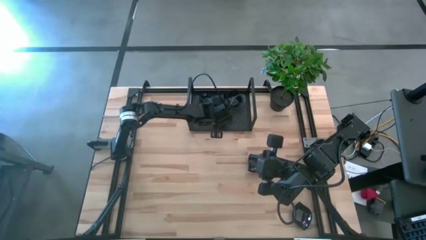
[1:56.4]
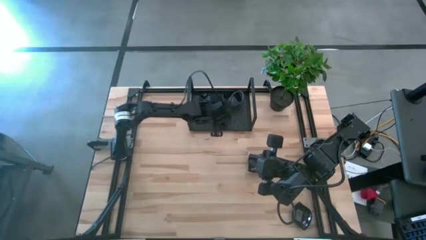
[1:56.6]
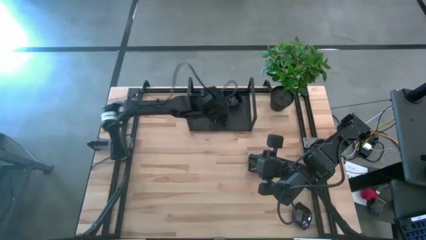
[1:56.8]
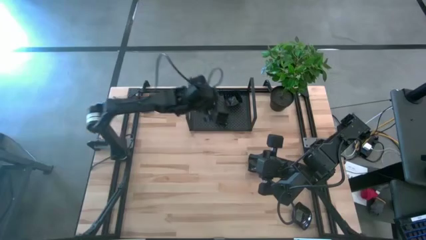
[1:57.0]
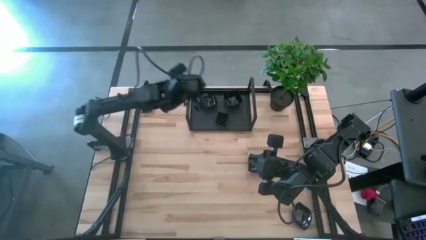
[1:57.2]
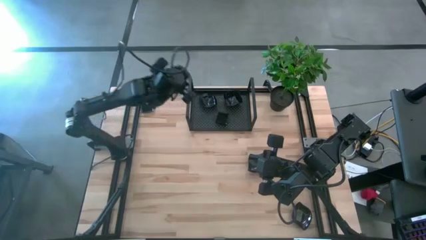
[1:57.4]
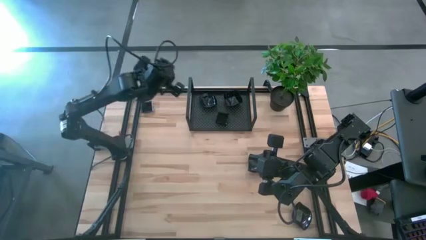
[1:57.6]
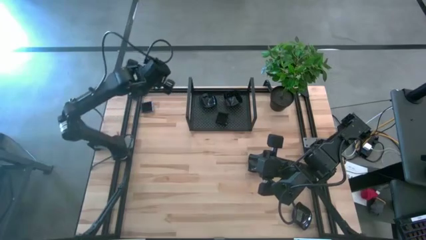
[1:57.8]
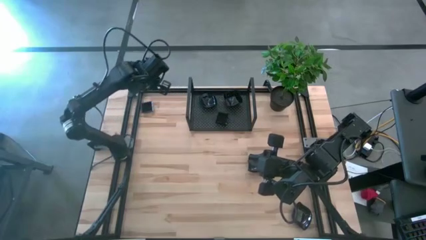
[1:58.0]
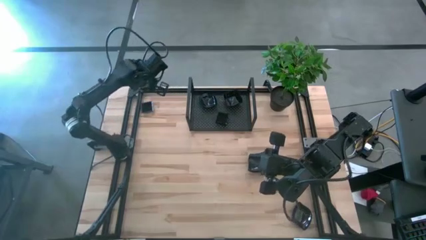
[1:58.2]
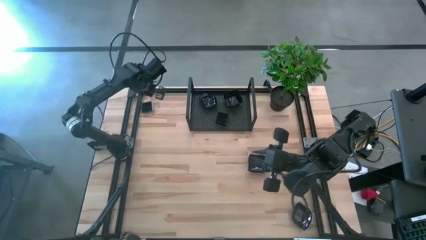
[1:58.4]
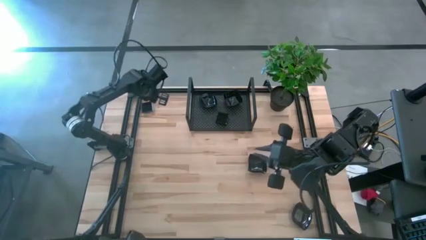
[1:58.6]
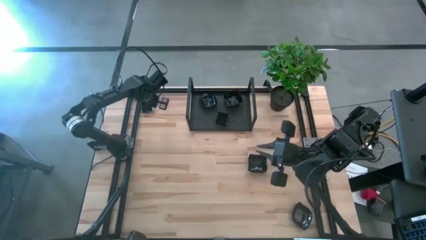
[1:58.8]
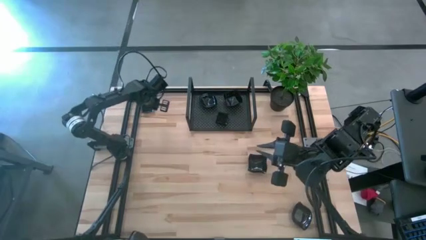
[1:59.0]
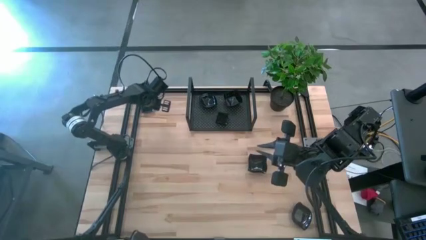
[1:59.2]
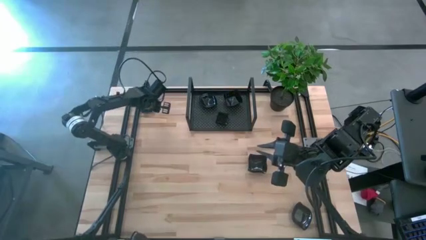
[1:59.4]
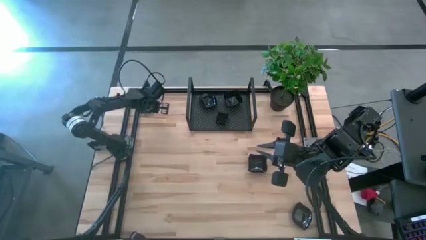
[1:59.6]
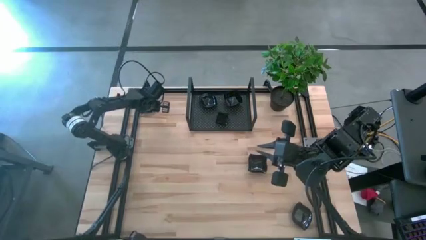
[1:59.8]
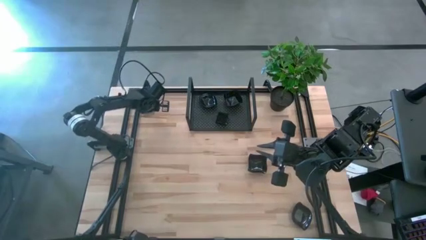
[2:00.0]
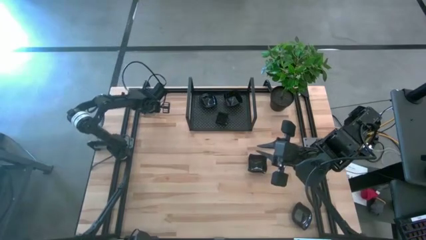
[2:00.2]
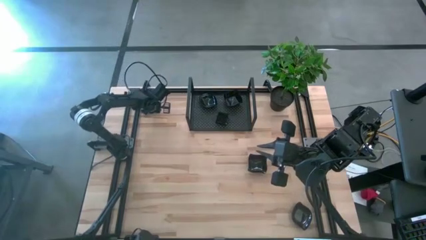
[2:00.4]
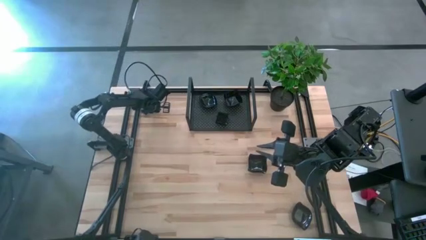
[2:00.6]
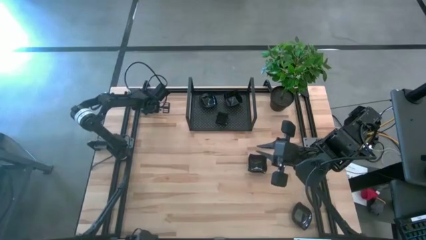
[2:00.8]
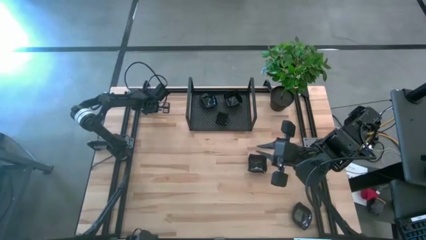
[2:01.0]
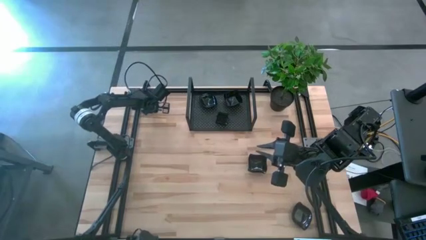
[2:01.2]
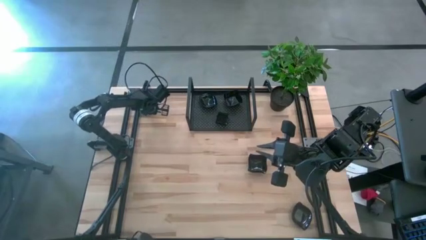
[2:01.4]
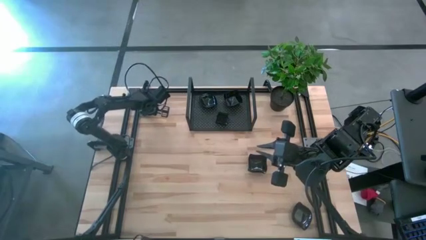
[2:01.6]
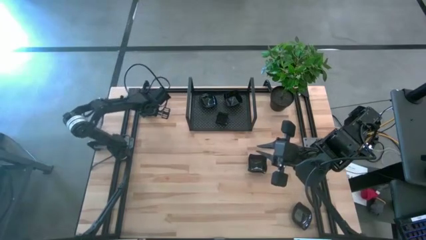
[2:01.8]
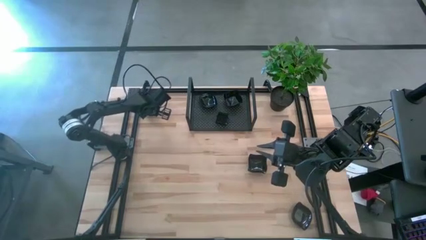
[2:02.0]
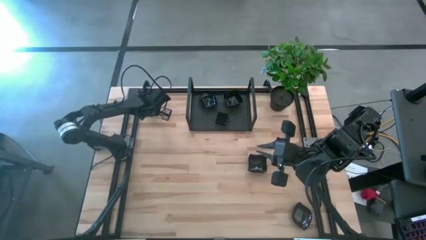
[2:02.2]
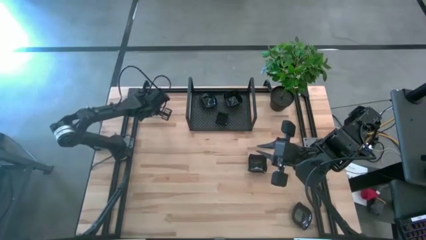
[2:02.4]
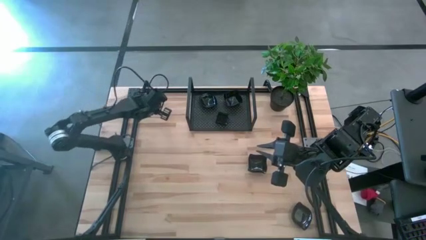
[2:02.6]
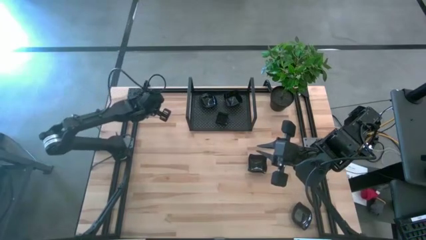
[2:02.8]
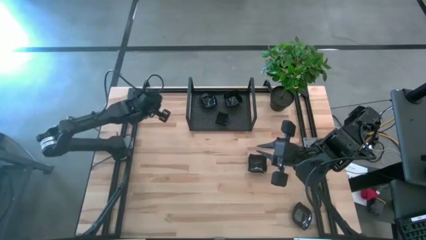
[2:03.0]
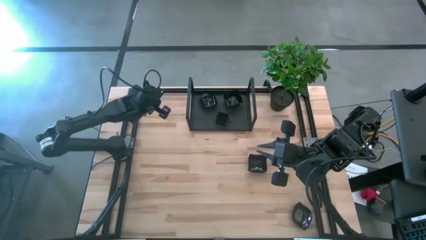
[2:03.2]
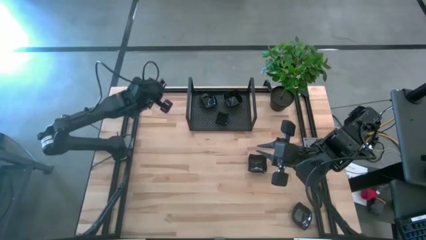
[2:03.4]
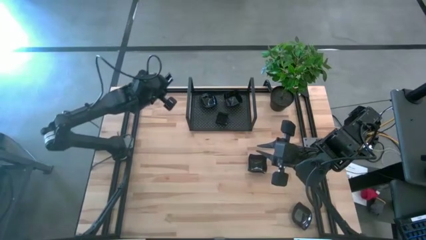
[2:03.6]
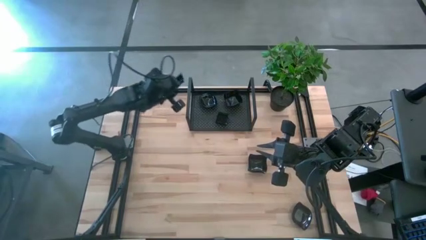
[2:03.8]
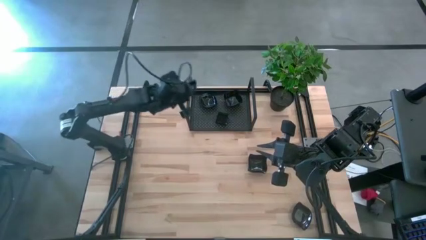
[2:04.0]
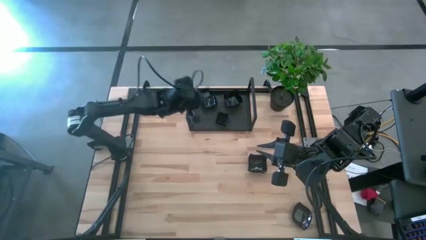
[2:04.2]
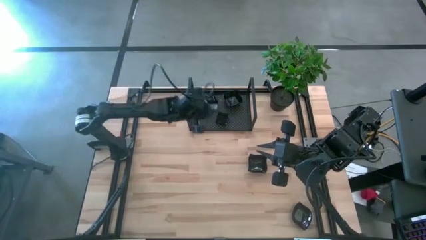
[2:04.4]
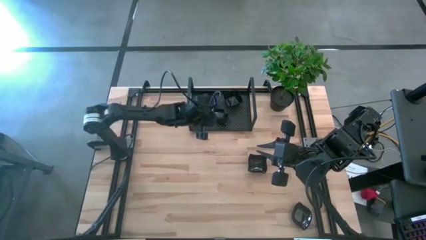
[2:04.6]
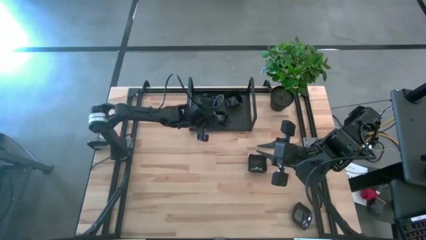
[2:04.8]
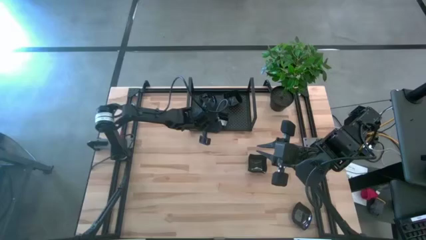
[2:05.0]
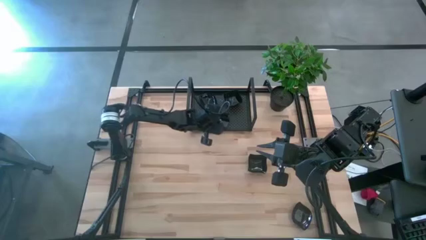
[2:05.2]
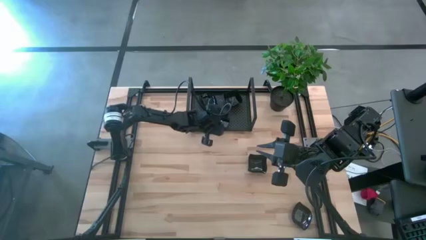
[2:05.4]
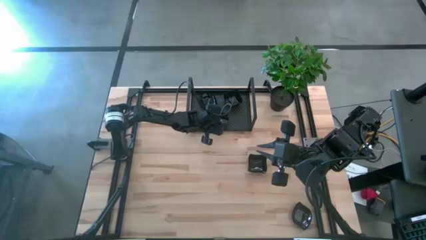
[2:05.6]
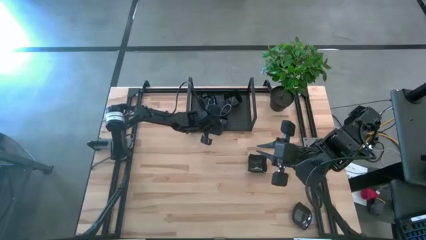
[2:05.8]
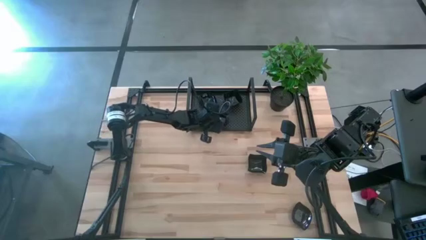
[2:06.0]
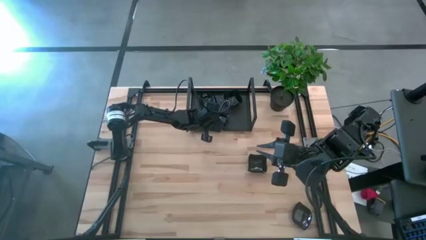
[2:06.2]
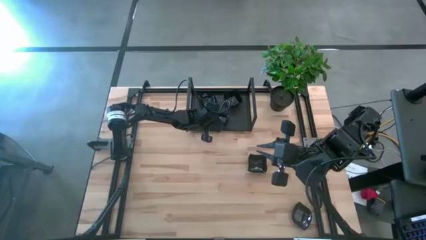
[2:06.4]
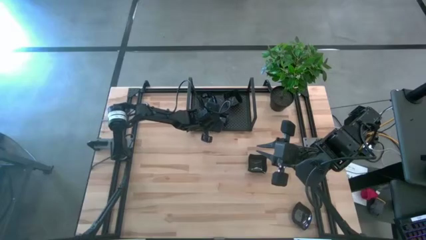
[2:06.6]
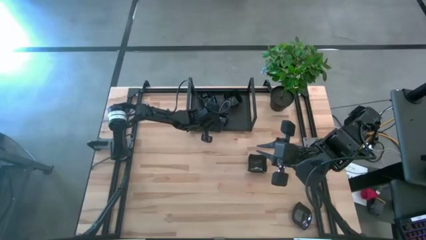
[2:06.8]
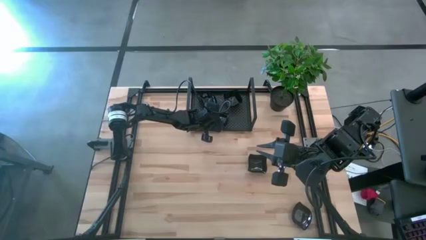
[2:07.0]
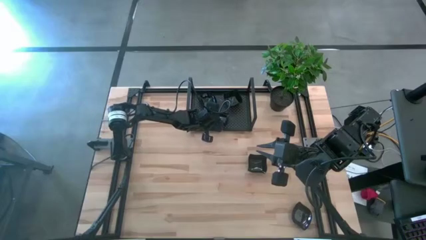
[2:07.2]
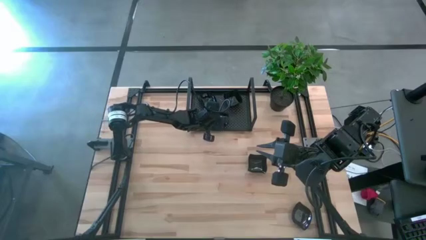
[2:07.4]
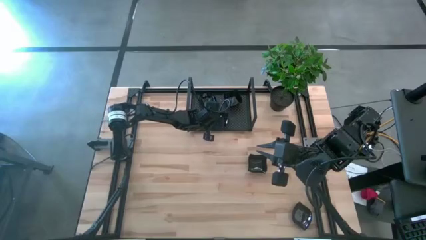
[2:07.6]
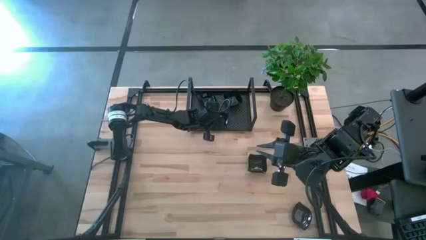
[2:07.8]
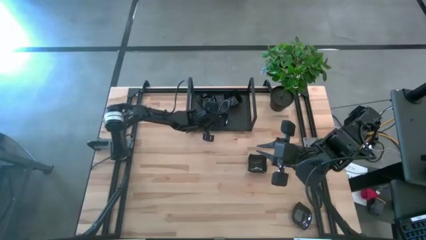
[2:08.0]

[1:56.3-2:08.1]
Task: Pick & Place Mini shaped plates
Stack the black square plate on top of the black square plate on the shelf

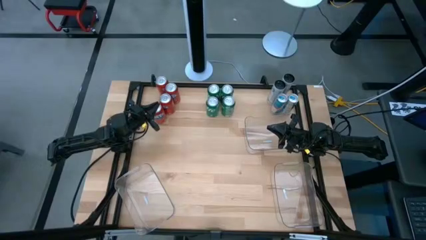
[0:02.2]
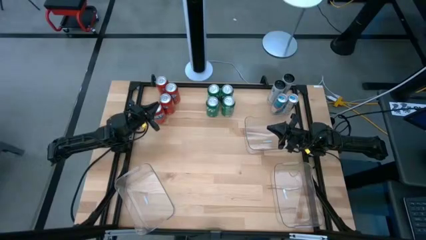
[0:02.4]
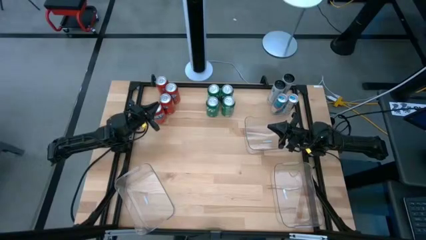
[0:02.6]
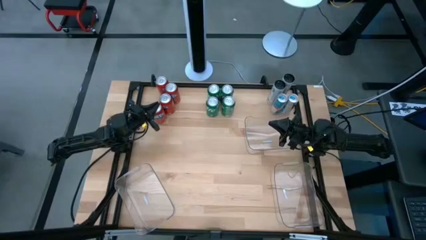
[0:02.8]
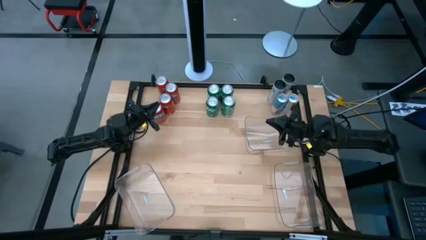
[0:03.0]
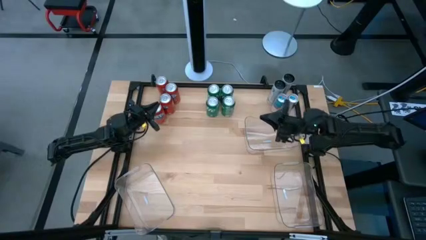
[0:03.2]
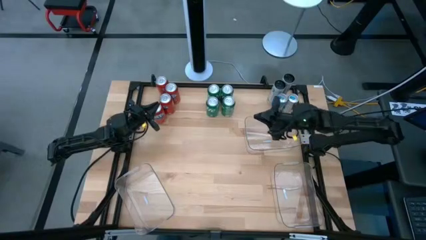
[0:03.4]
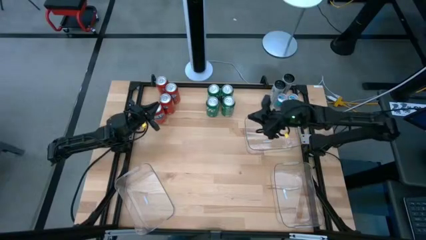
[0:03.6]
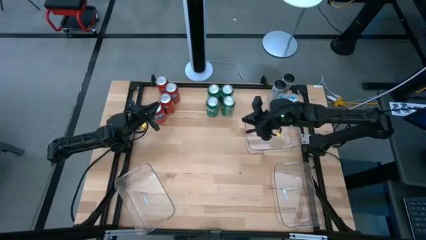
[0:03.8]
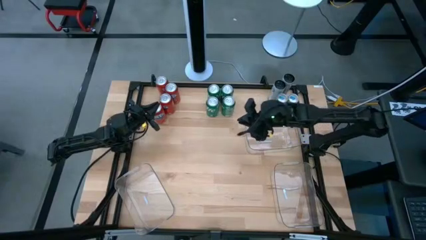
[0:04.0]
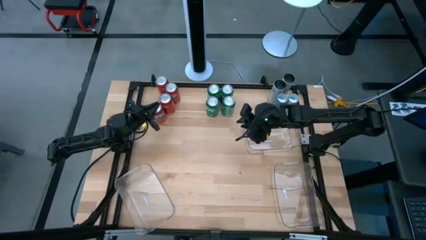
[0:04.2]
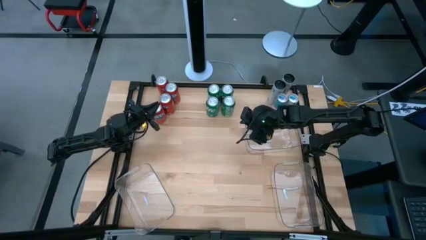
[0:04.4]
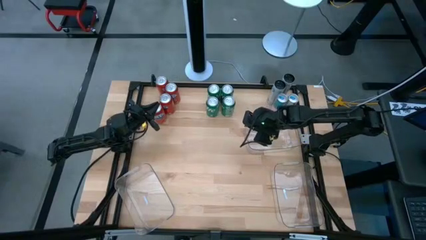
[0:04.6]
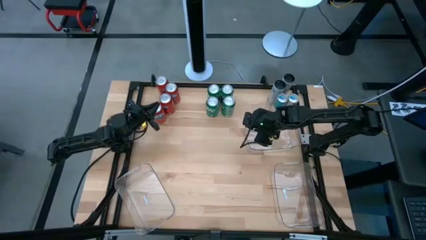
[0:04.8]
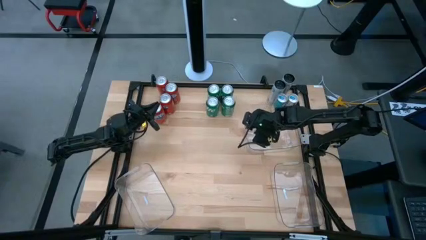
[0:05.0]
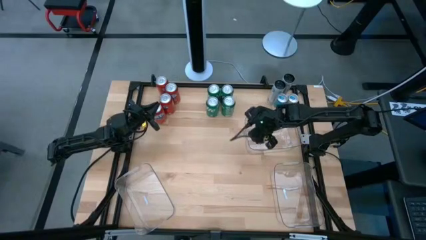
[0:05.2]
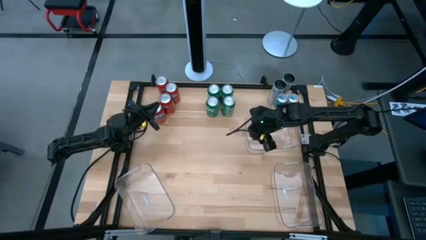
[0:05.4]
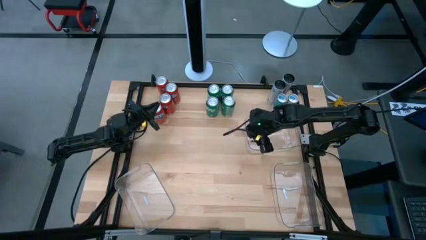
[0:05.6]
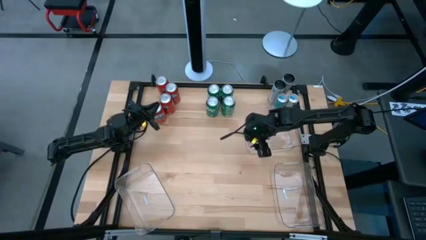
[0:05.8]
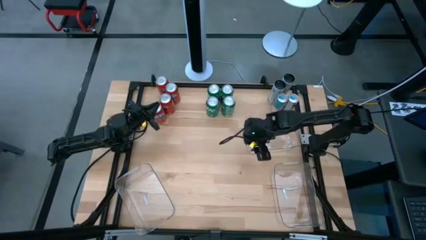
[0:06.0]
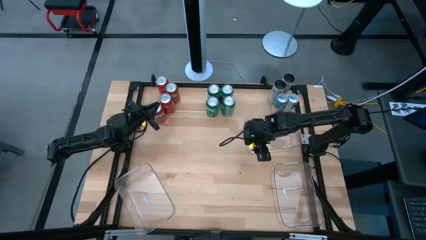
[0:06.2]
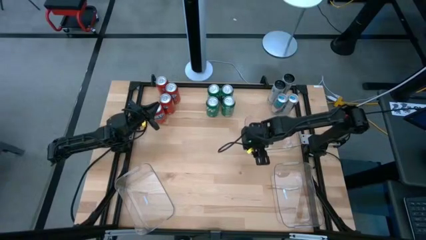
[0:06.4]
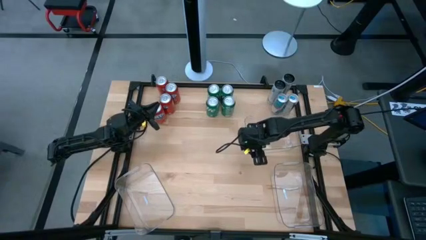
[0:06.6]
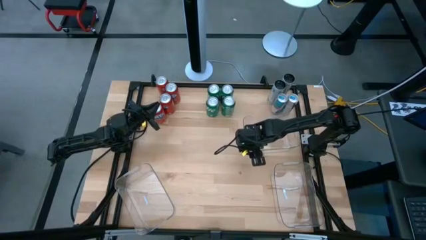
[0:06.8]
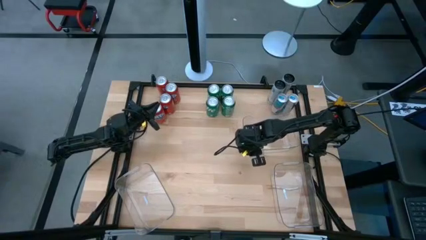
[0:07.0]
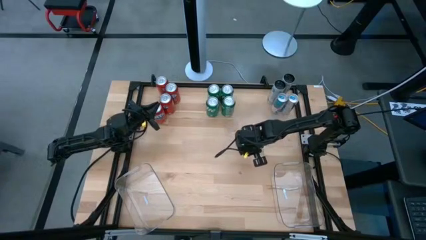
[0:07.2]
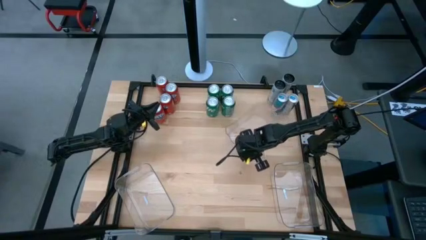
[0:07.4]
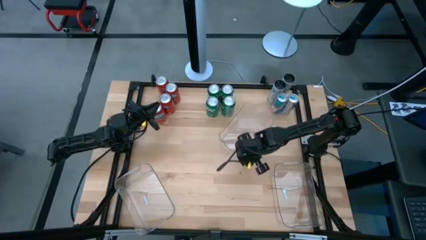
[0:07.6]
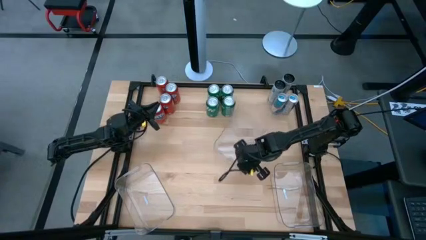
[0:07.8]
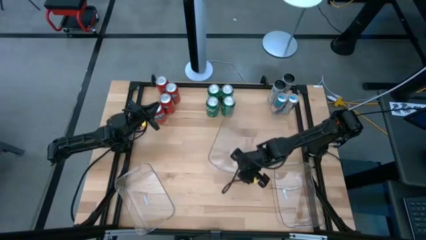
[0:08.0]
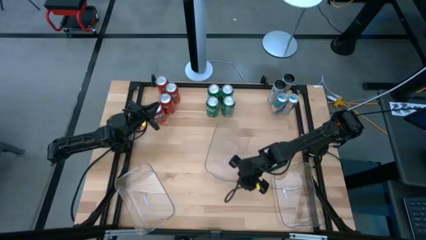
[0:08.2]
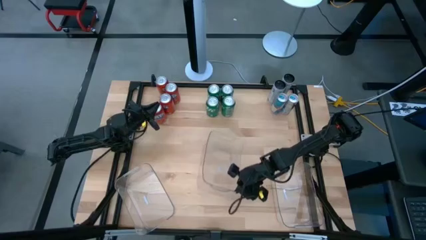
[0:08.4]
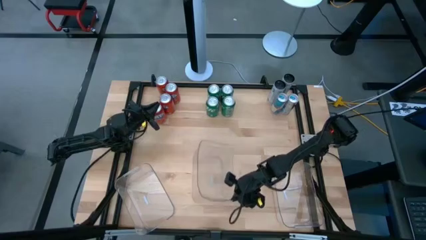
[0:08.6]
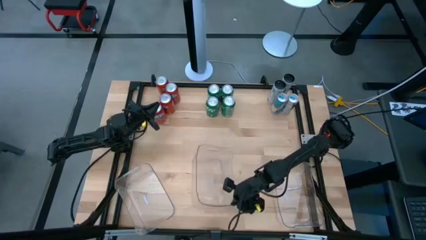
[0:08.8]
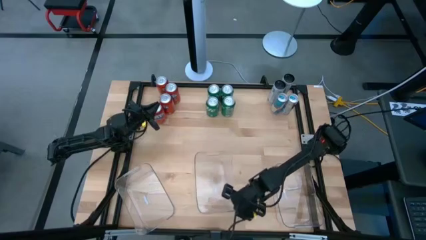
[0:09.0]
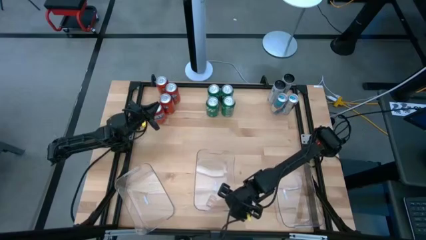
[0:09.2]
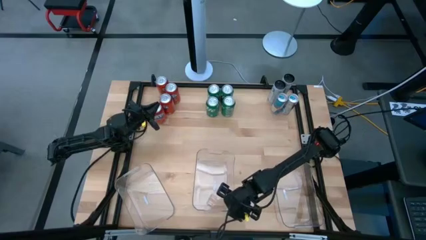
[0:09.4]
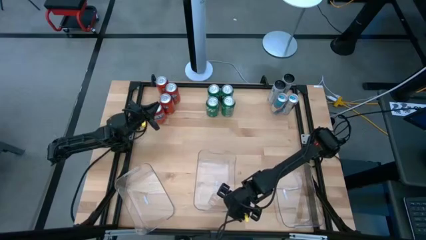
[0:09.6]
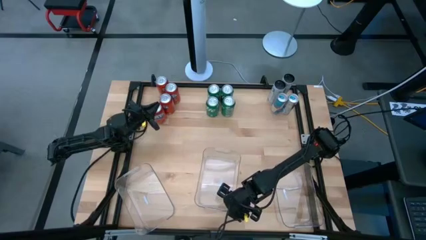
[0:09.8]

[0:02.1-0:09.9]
Task: Sort soda cans
Move the top transparent bin to the bottom center of the table
